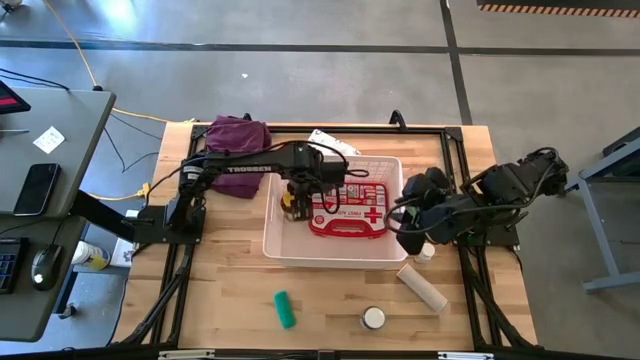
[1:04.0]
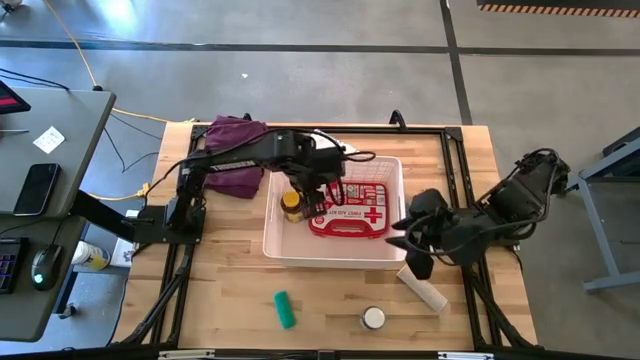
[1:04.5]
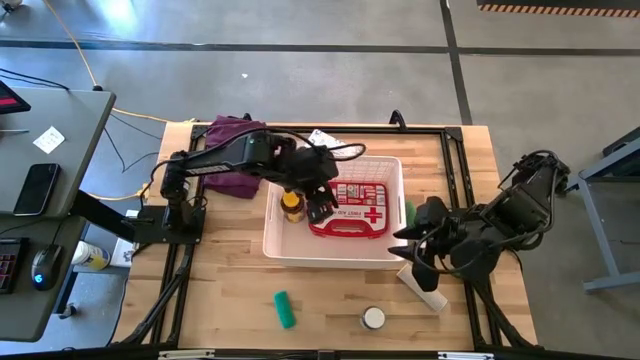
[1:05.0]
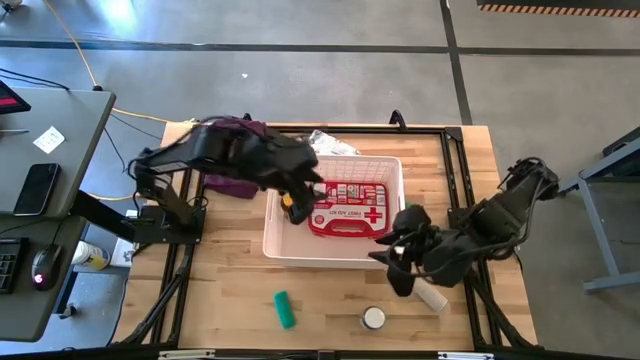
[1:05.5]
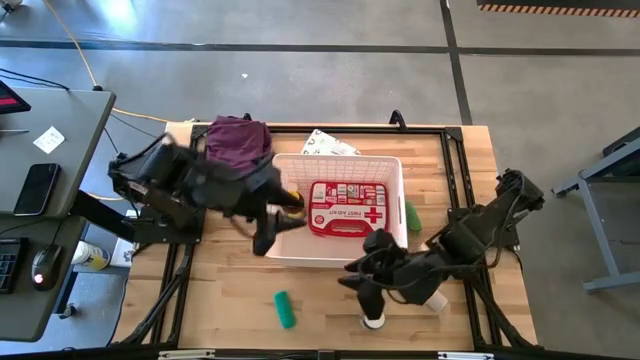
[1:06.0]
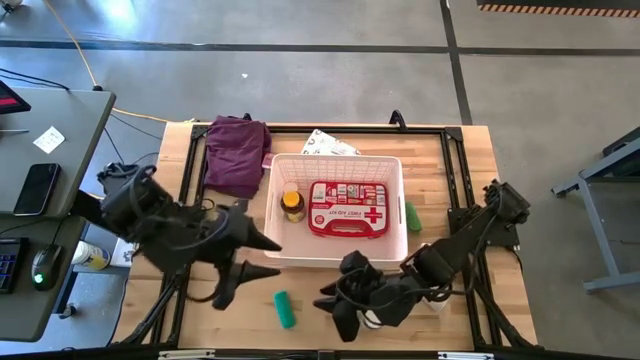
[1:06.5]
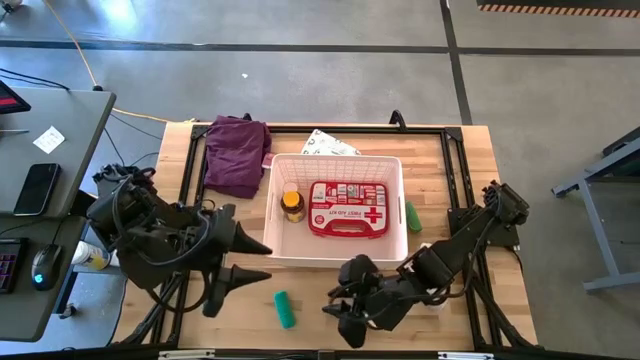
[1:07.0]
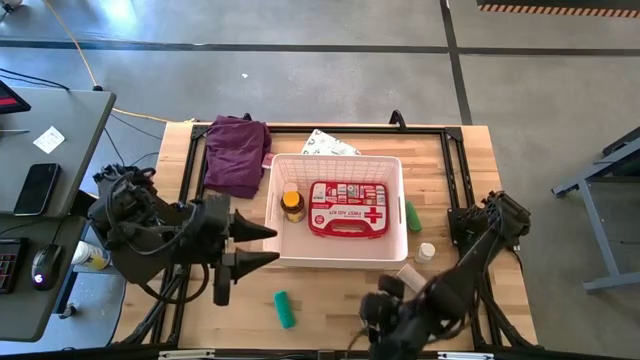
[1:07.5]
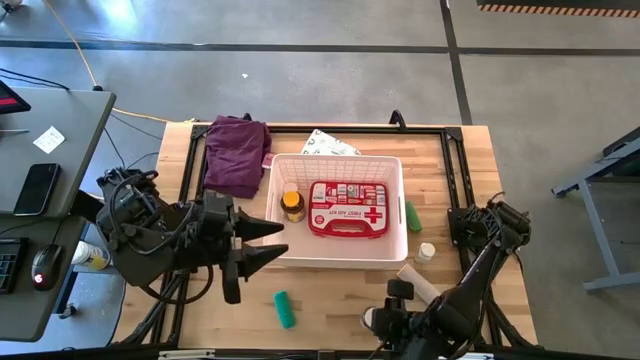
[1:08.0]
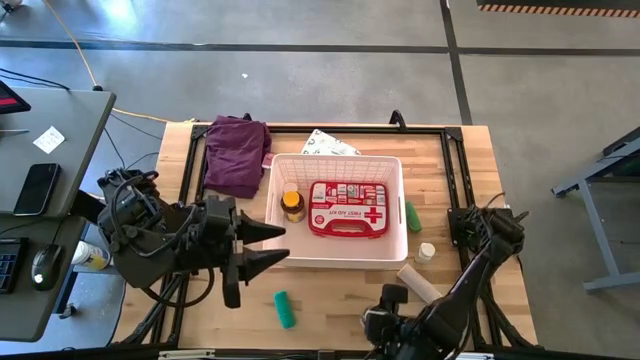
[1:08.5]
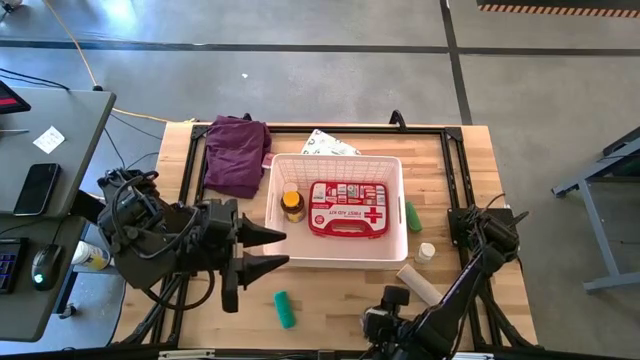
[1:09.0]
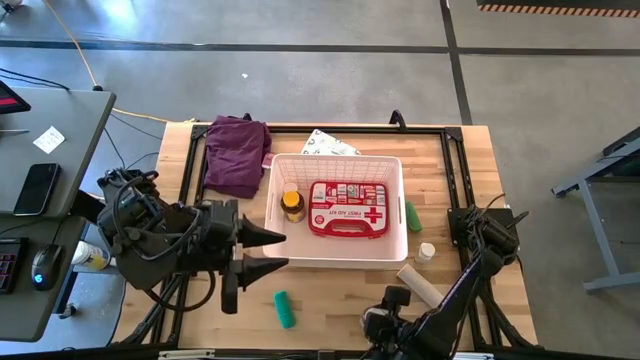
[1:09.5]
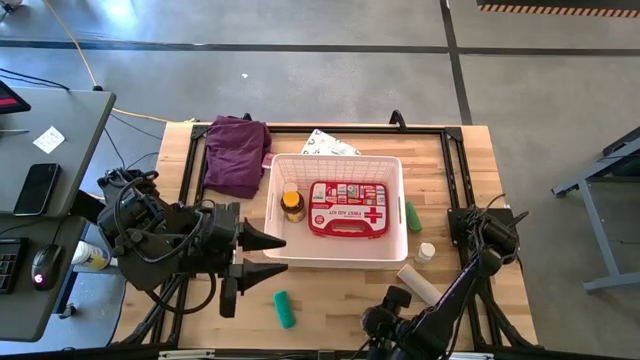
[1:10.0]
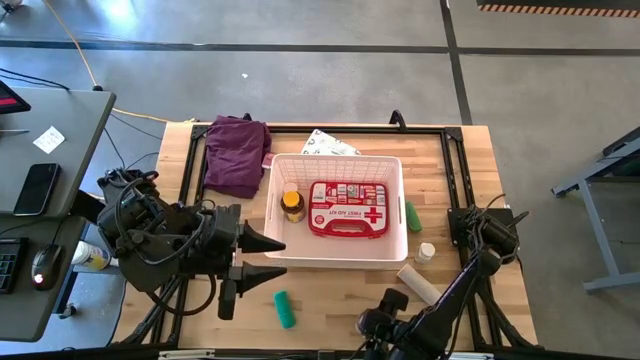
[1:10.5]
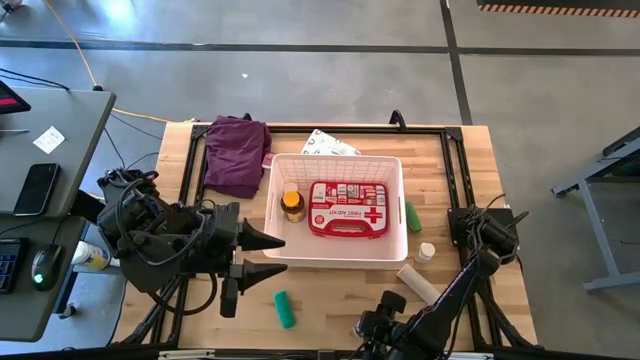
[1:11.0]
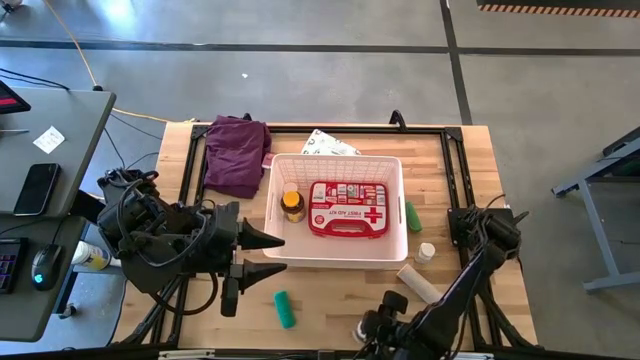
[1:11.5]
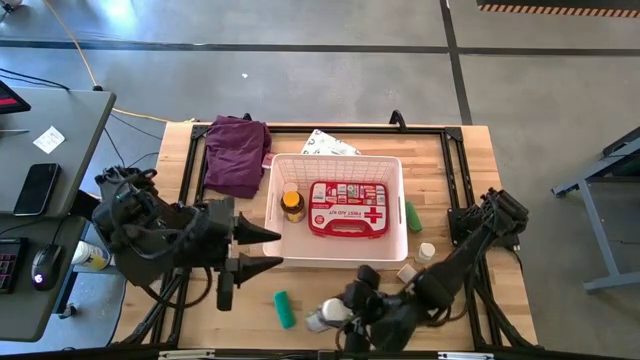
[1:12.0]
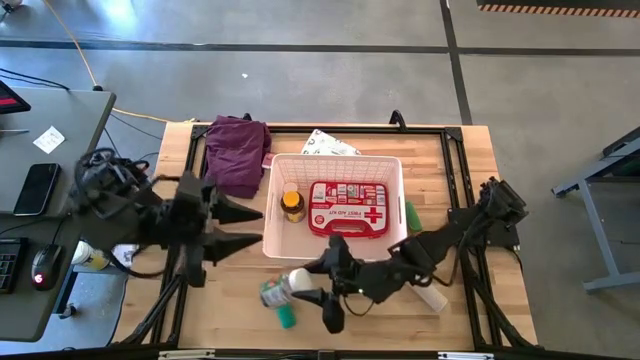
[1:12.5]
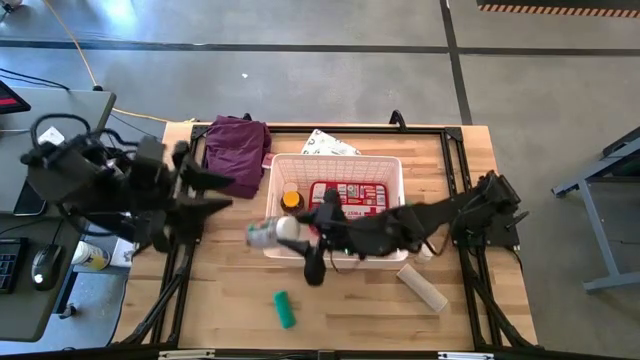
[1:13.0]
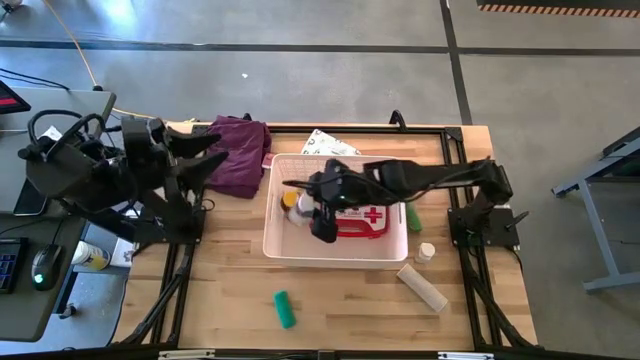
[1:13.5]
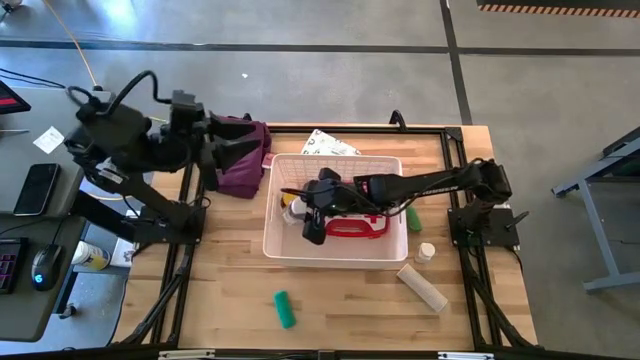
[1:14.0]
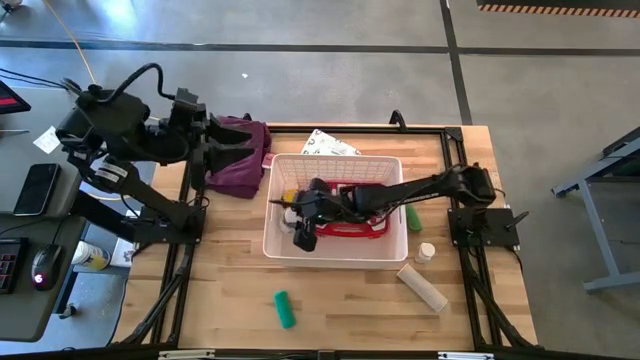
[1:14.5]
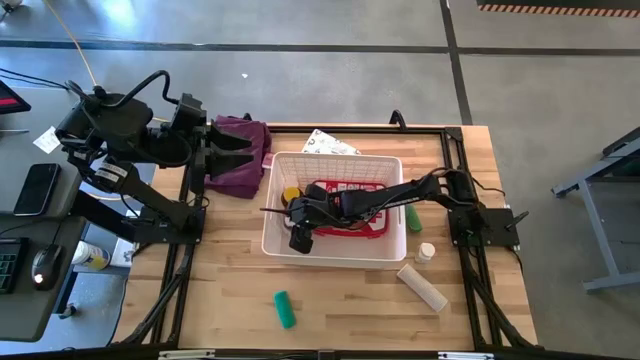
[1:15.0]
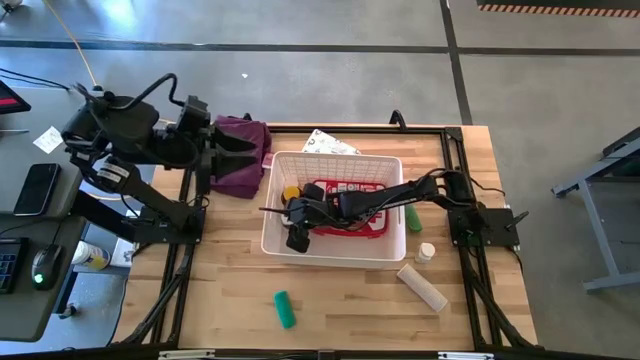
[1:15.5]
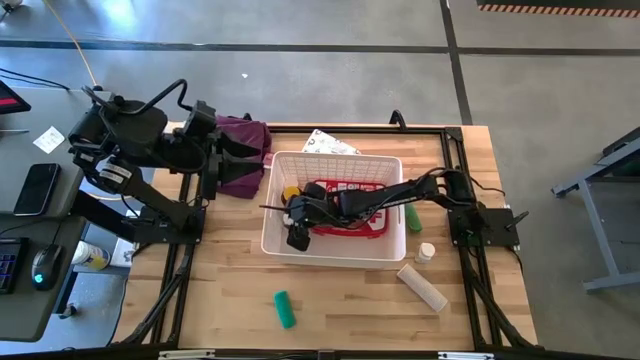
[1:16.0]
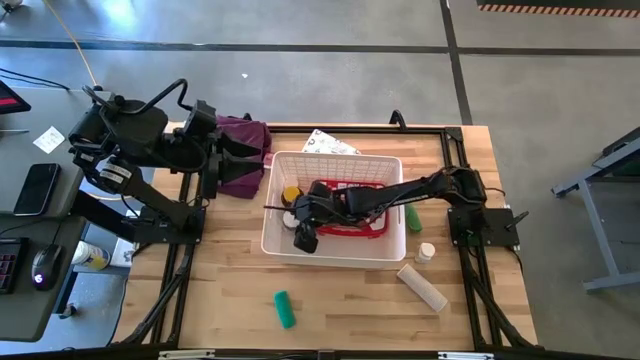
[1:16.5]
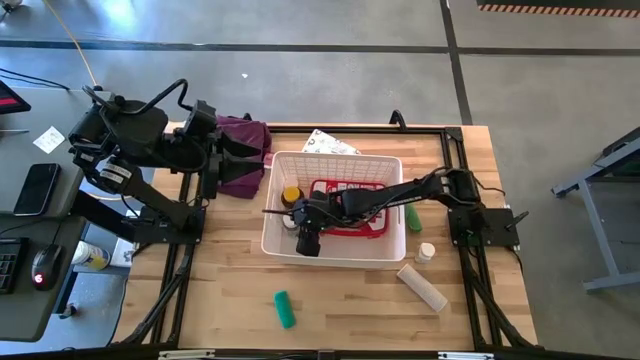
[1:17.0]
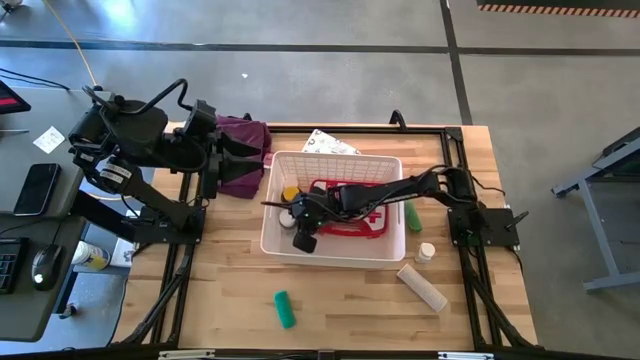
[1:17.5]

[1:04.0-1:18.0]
Task: Pick & place medical supplies in basket/bin
Put the green medicine bottle into the white bin

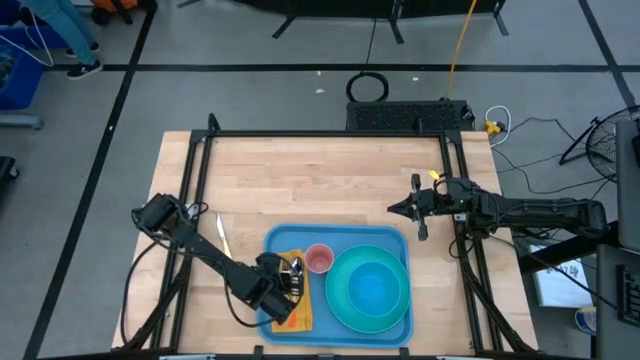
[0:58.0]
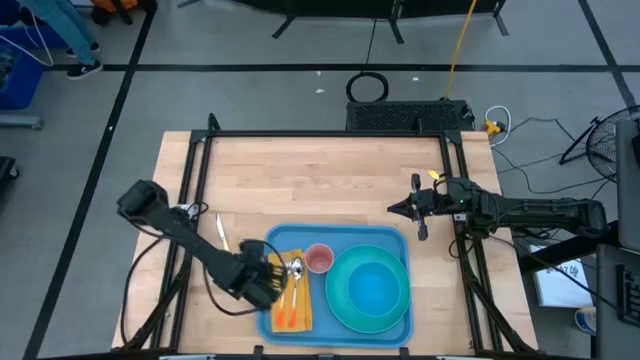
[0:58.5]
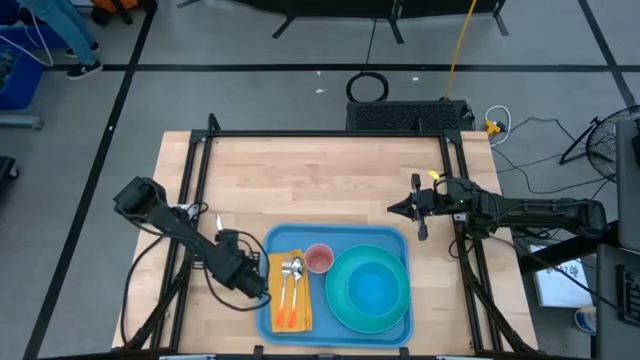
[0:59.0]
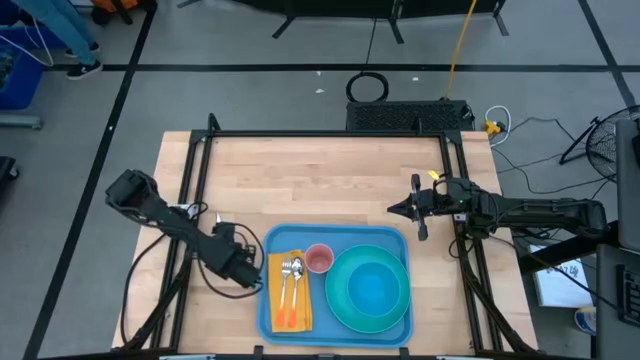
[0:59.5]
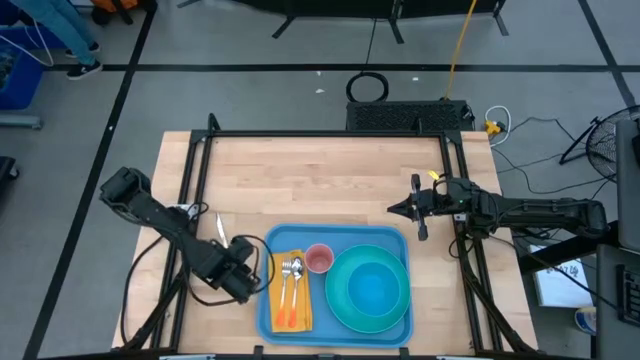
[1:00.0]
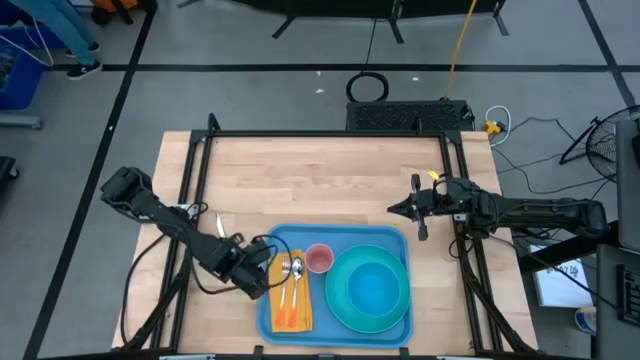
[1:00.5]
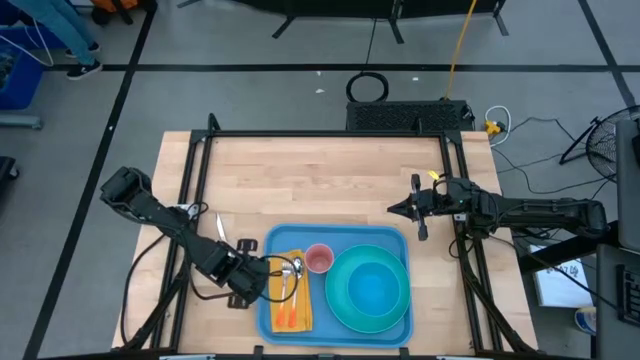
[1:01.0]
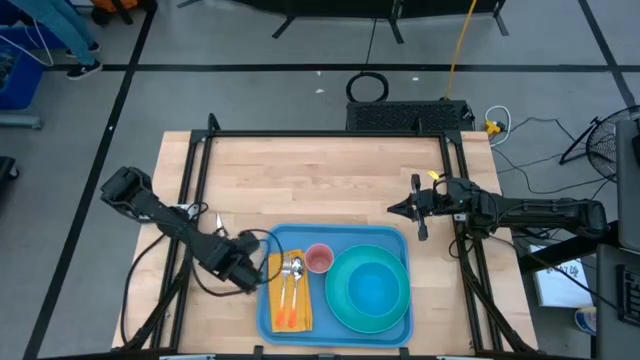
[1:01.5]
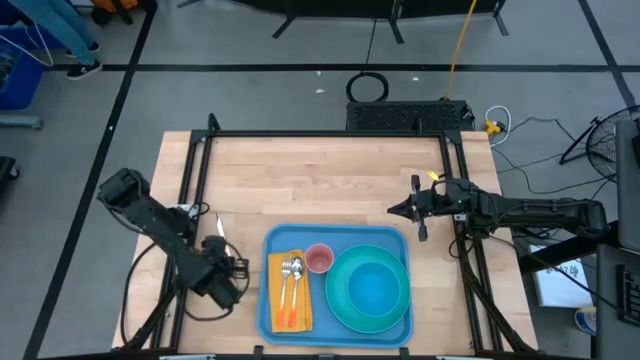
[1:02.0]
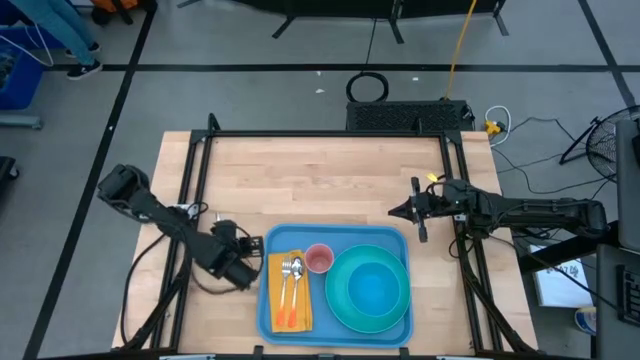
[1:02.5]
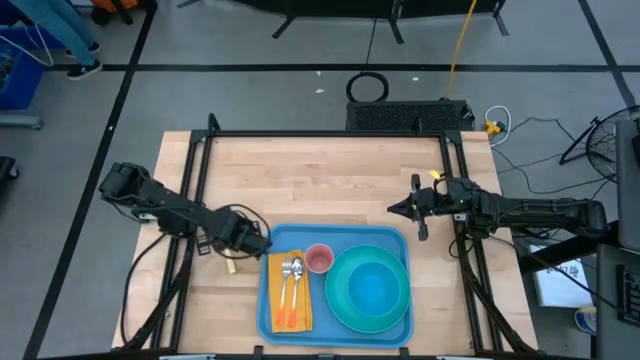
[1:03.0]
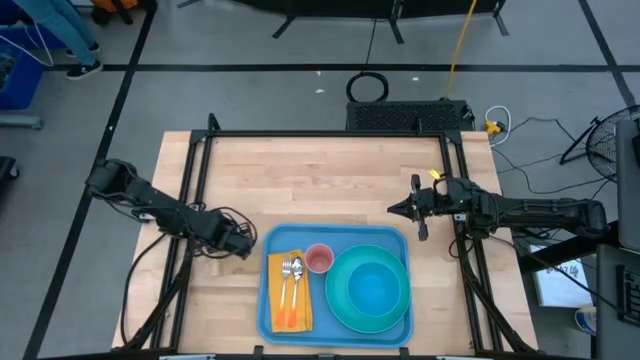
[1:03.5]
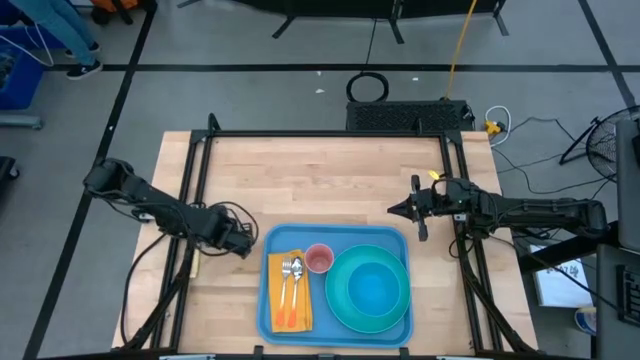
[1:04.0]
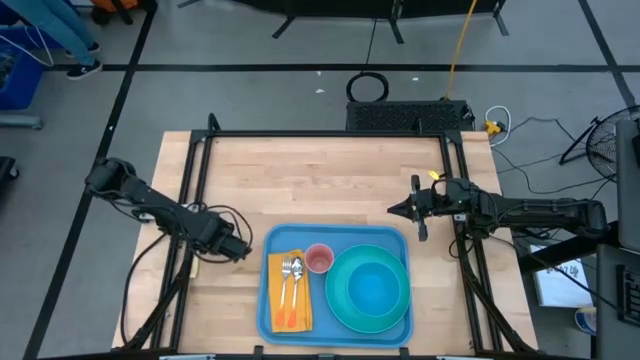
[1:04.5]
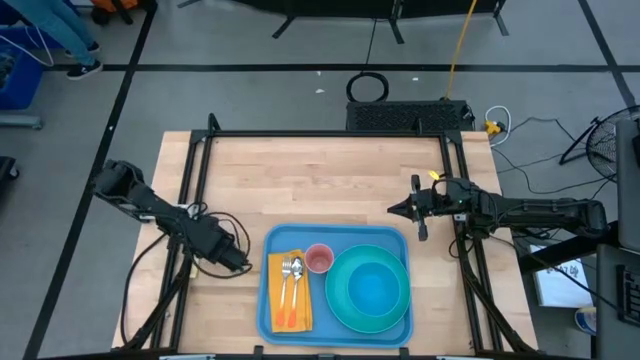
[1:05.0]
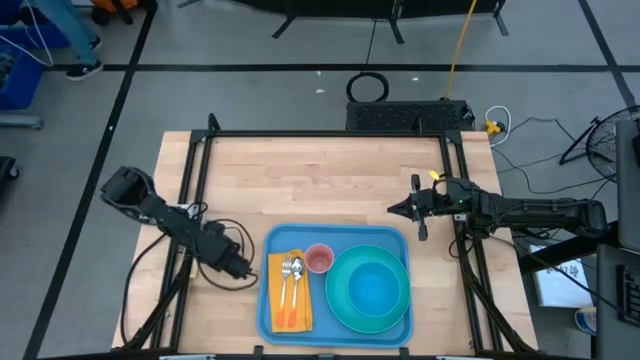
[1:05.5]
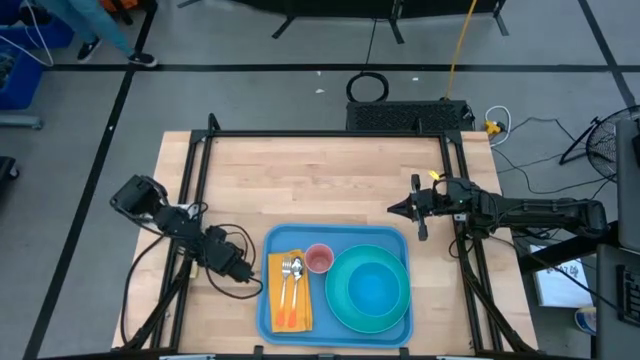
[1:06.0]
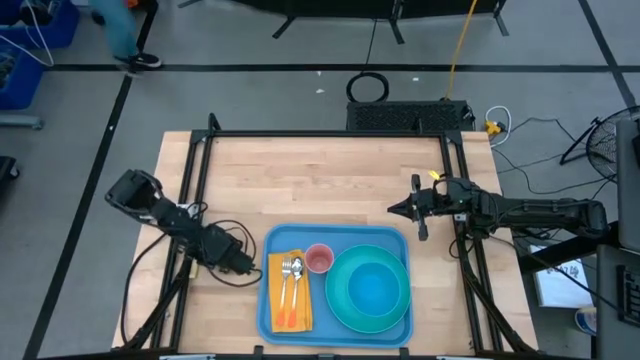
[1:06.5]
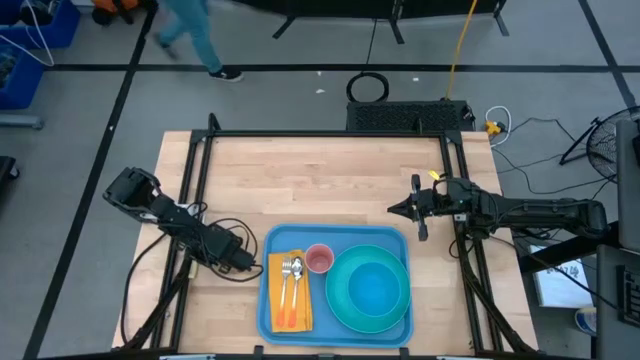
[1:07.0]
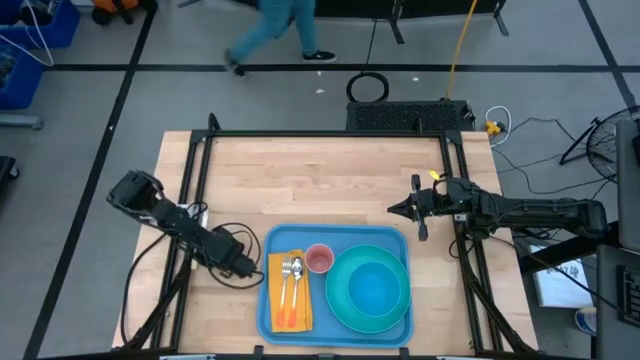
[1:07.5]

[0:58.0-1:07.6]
Task: Set up tray
Put the knife on the yellow napkin to the left of the orange fork
